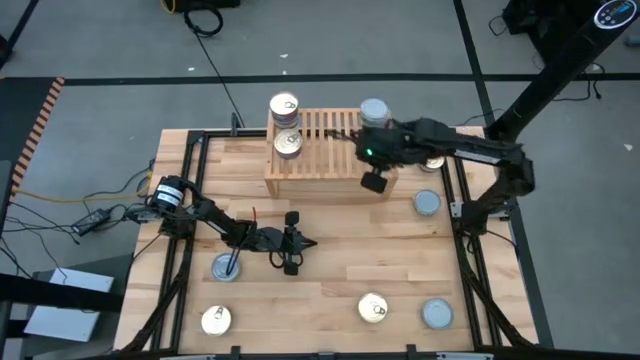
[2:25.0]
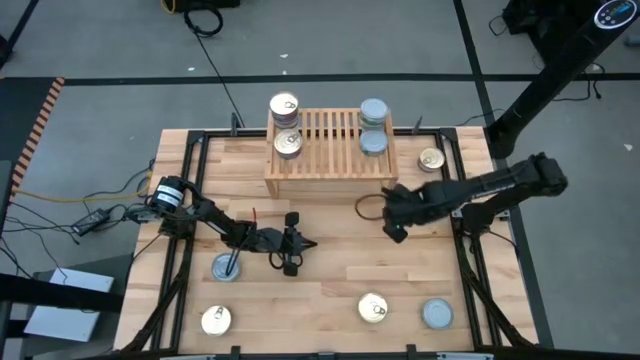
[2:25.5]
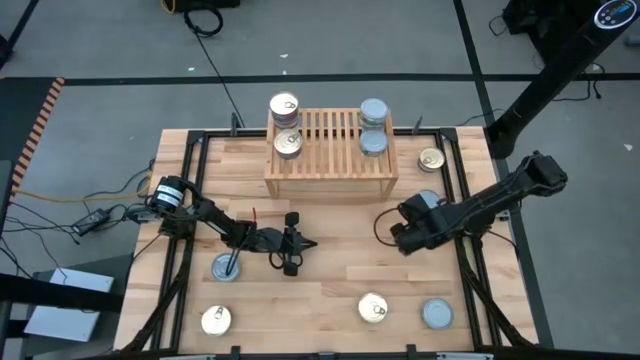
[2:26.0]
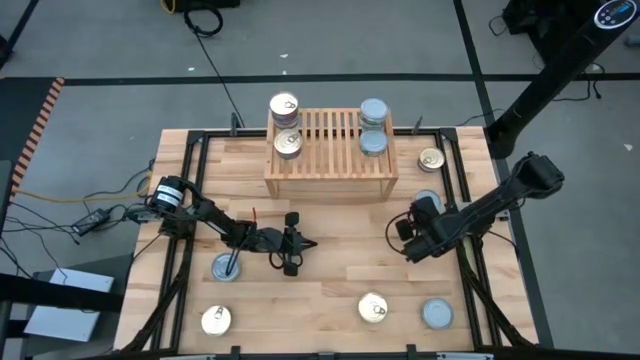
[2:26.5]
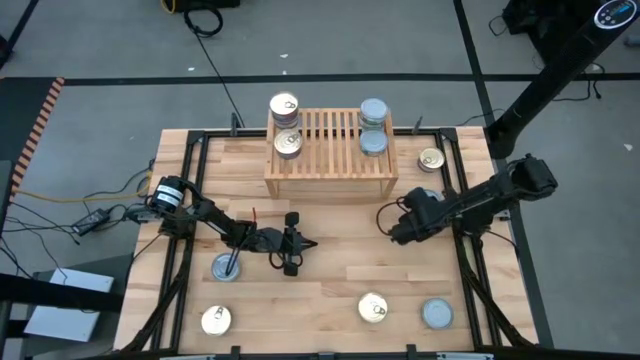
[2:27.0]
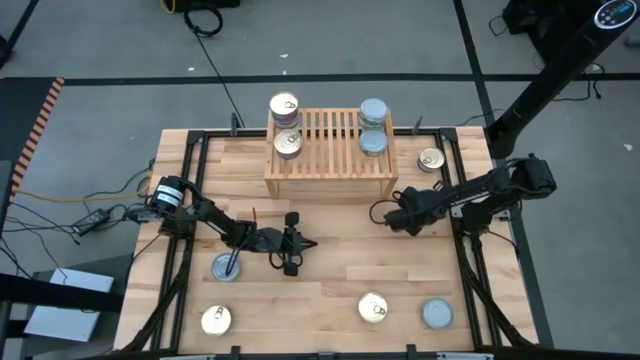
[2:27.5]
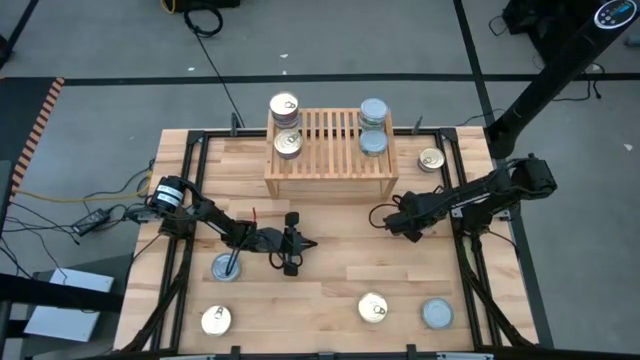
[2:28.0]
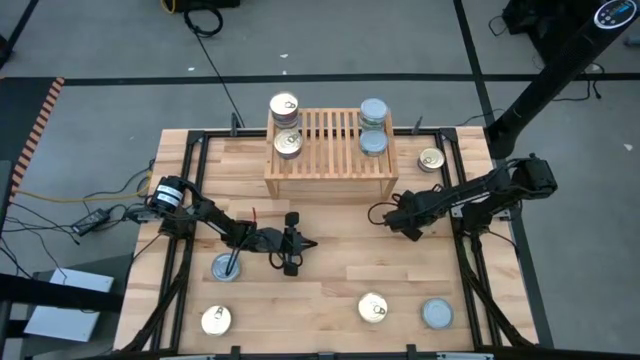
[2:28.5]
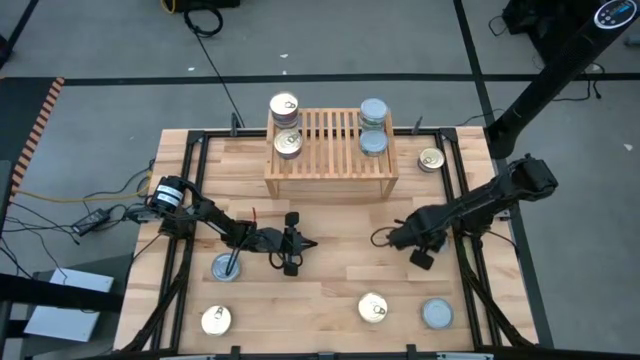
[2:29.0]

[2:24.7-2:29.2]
Task: Stack canned seafood by type on shelf
Adjust the green tuna can

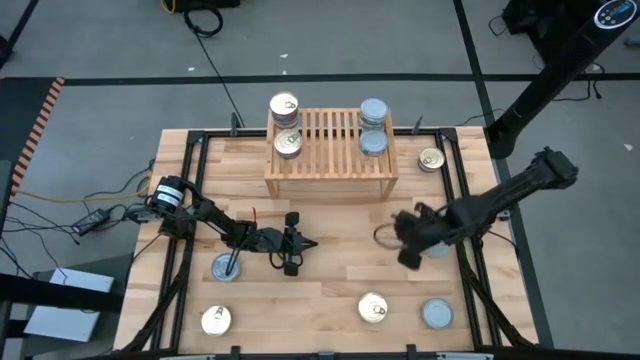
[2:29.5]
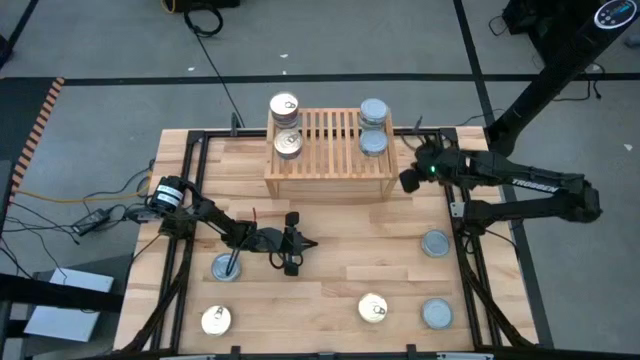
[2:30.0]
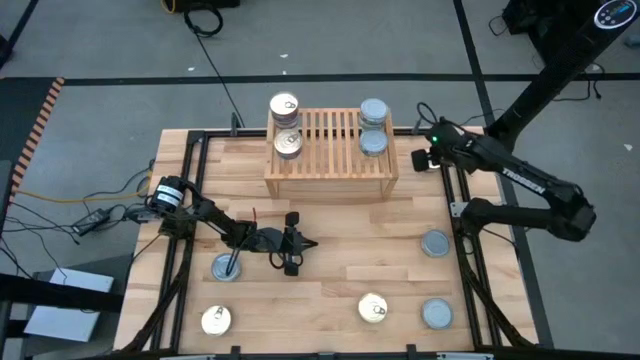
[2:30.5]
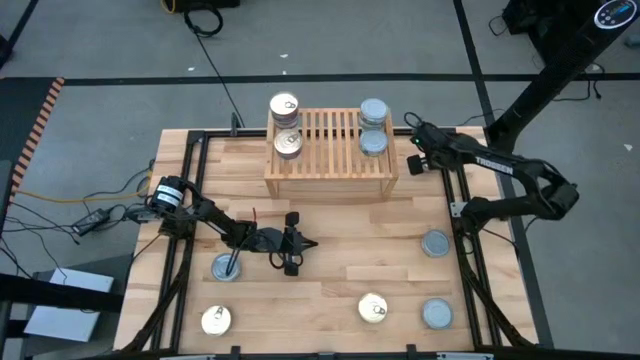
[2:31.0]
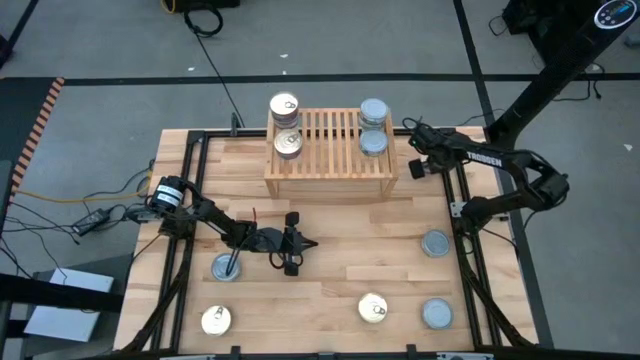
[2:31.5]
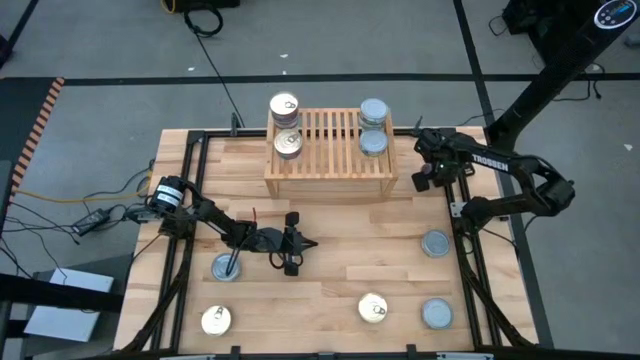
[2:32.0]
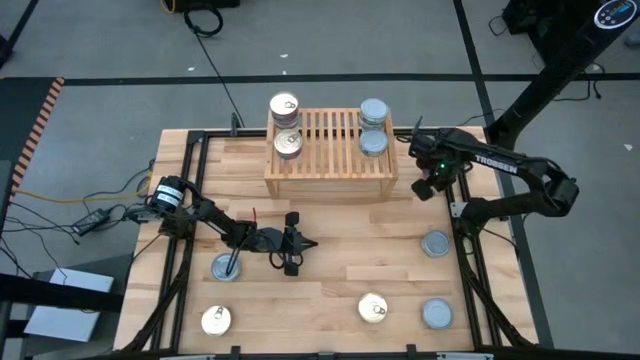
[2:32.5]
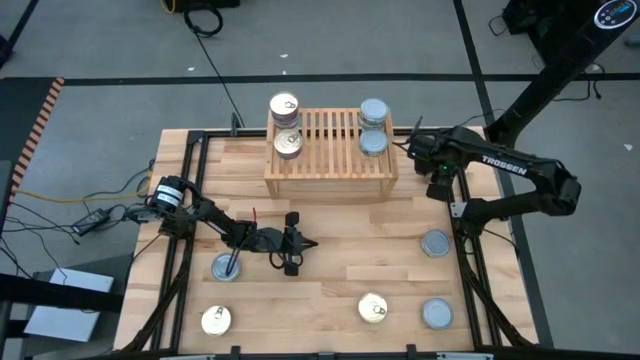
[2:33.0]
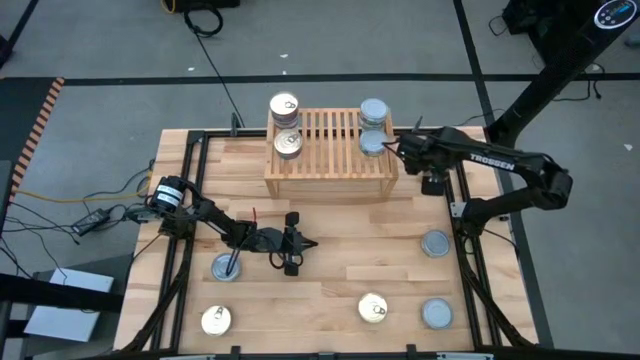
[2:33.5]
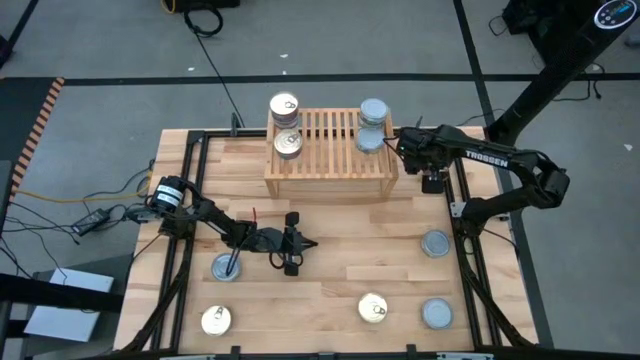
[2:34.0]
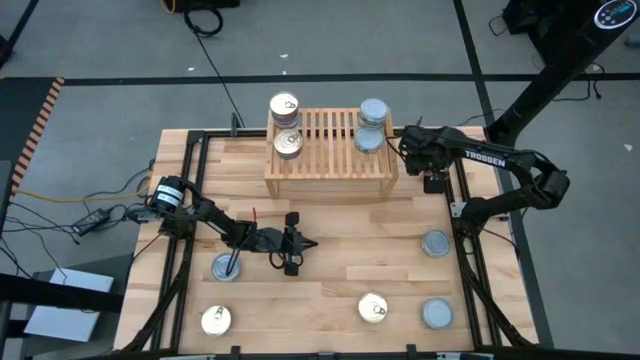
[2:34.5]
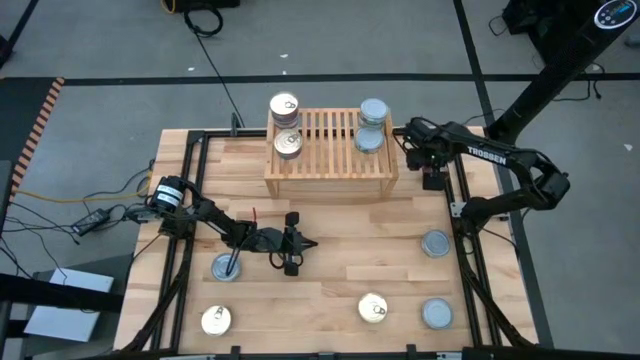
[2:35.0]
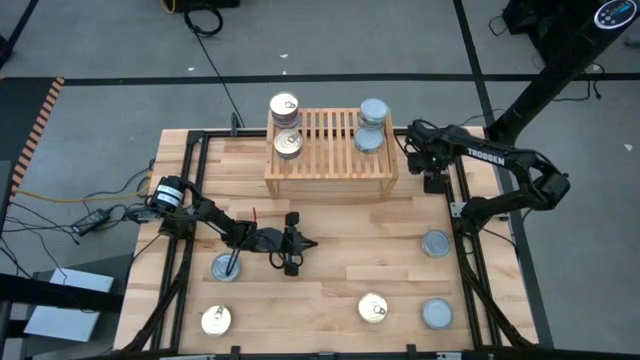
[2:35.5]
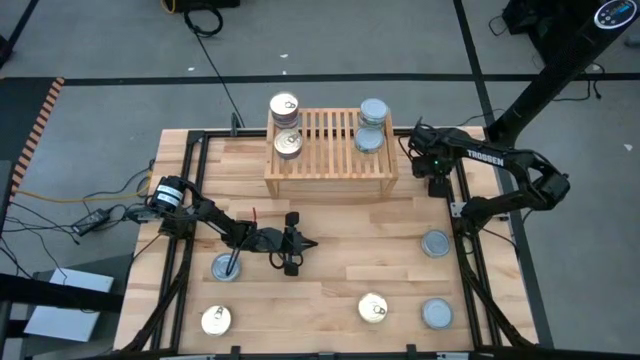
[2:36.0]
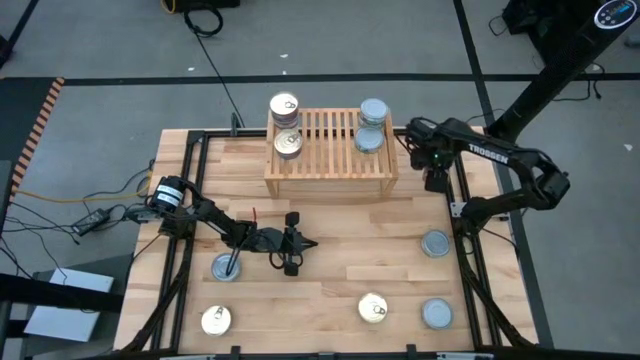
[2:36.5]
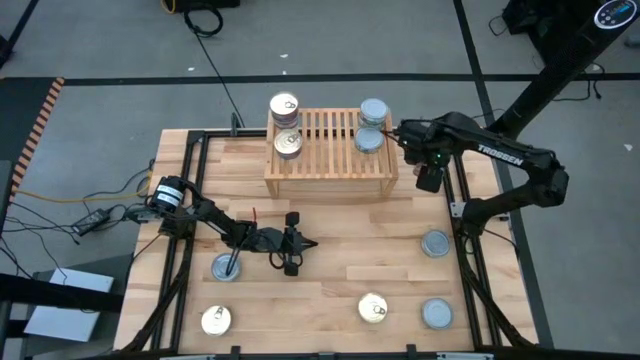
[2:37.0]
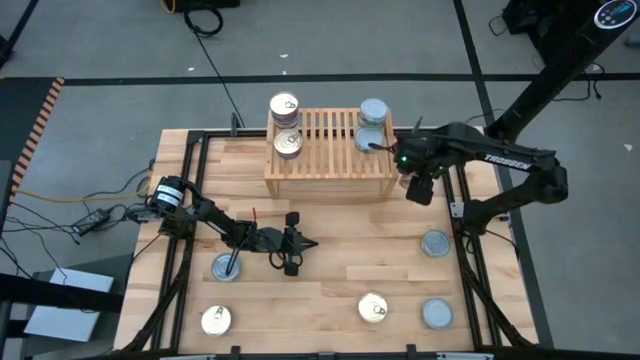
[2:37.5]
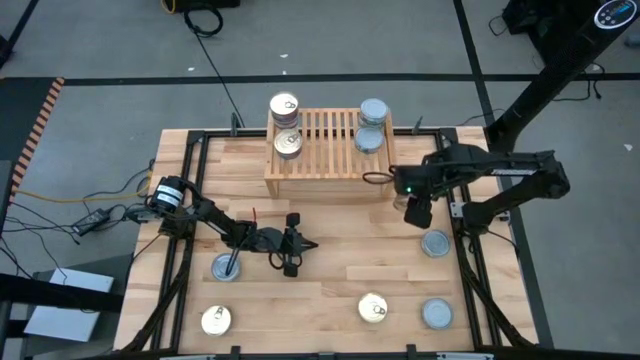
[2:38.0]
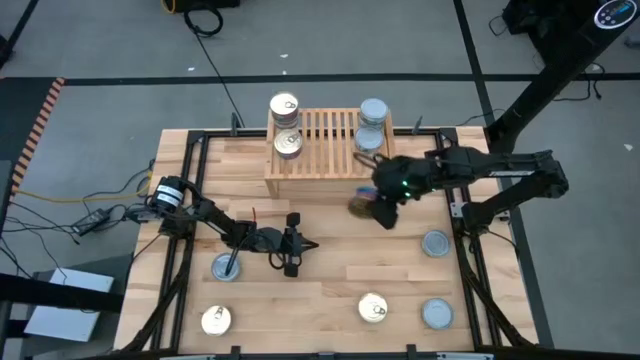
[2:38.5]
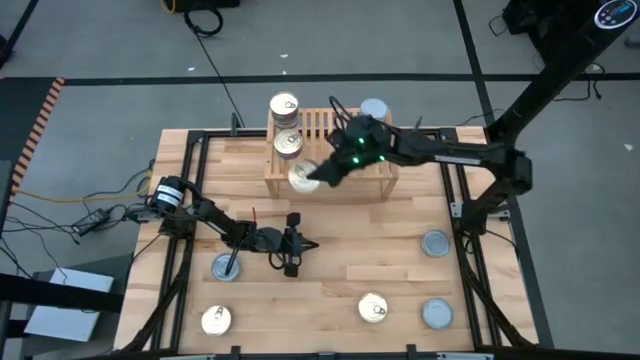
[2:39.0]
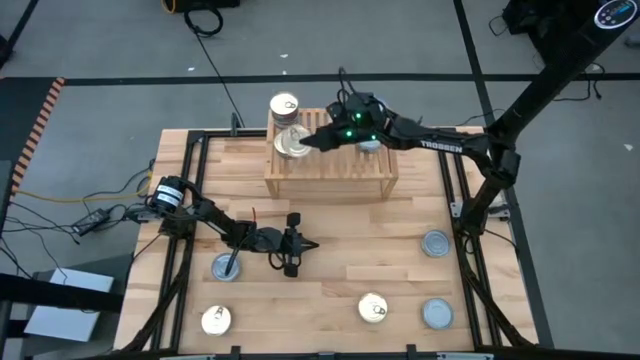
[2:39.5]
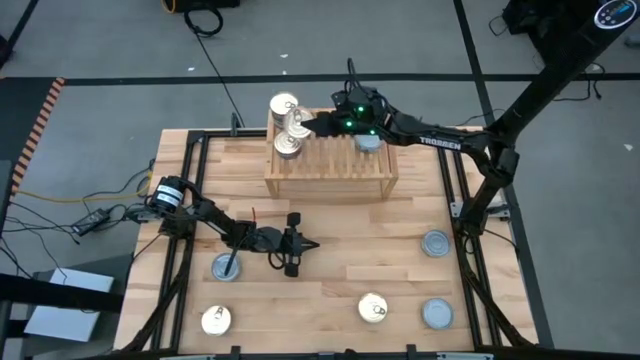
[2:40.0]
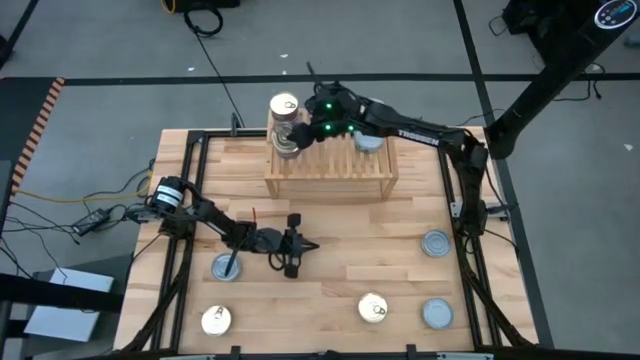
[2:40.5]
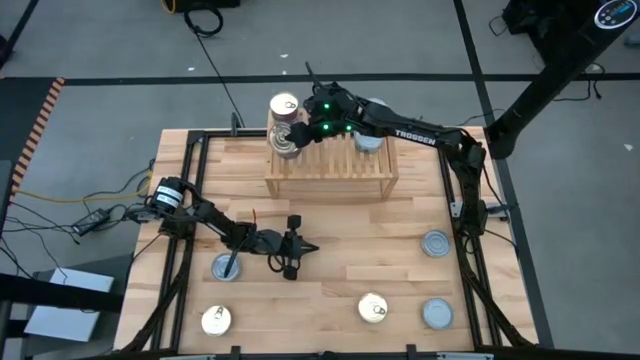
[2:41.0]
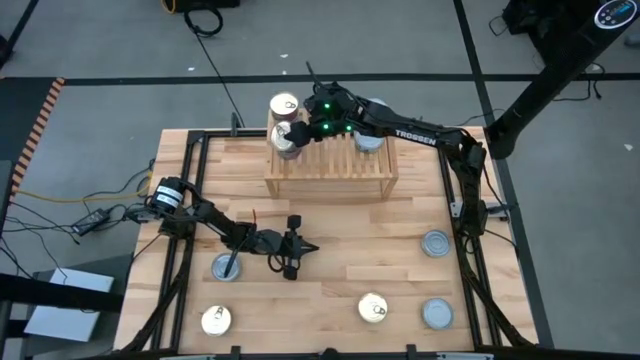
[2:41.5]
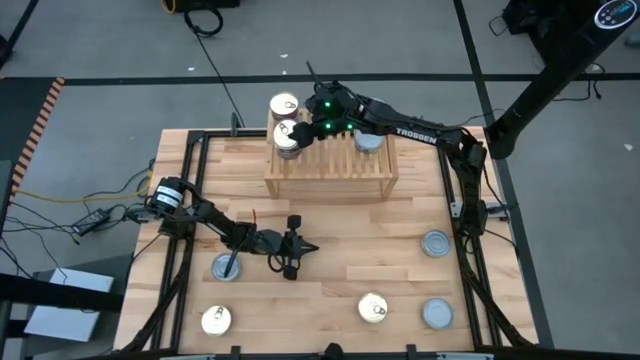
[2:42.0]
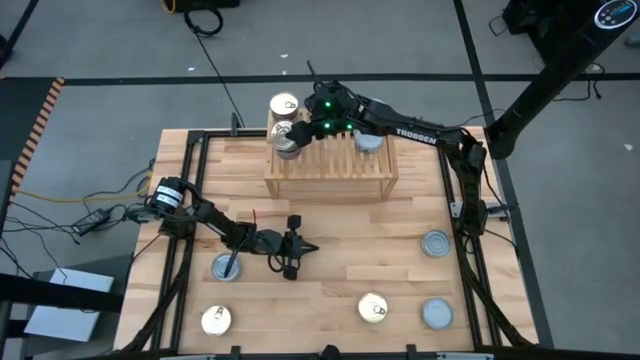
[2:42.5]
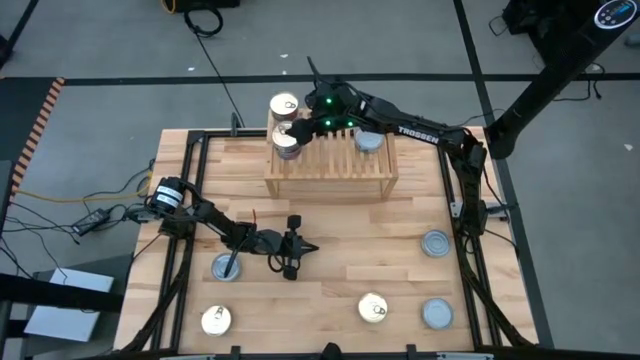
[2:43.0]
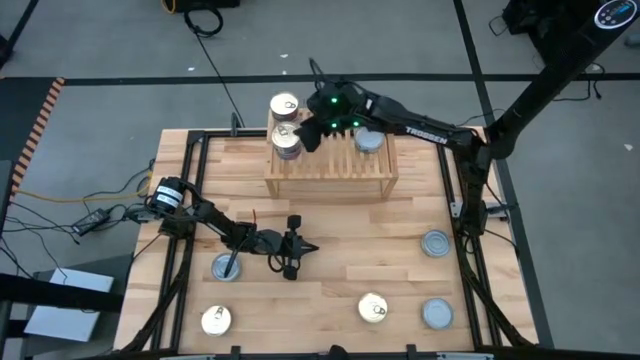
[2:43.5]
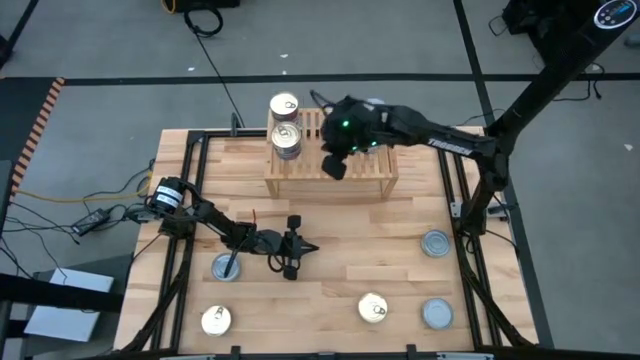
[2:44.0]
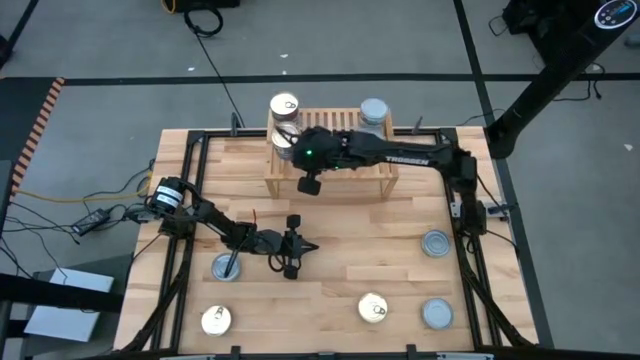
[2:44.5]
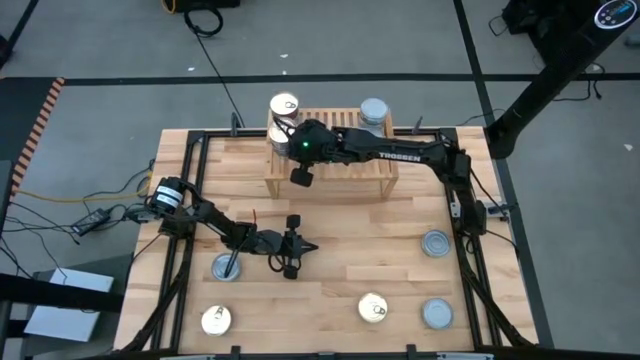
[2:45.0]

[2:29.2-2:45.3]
Stack the blue pink tuna can on top of the blue pink tuna can on the shelf
